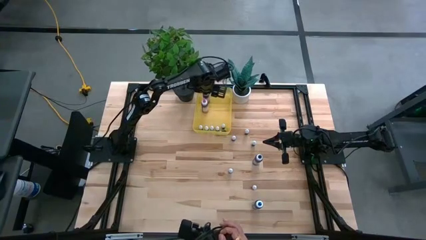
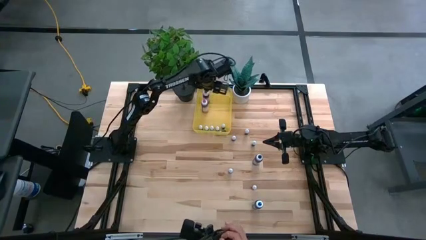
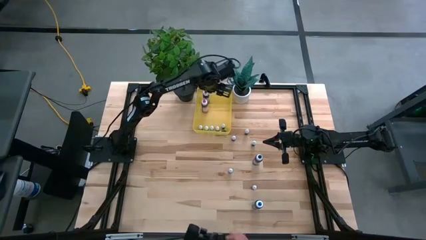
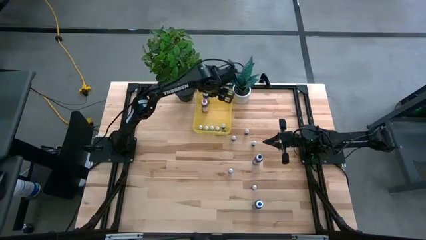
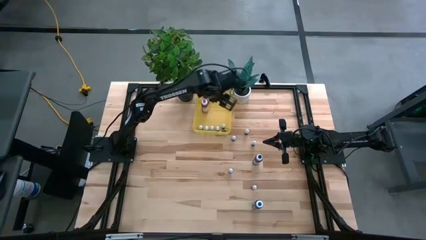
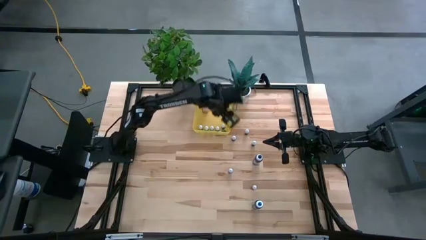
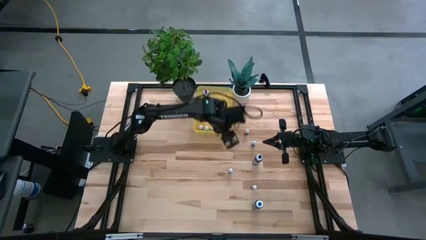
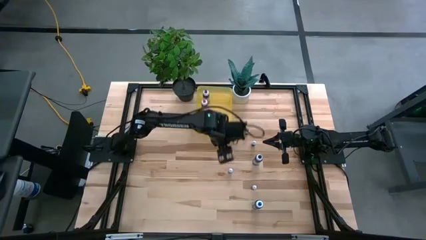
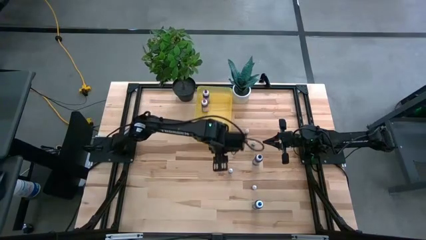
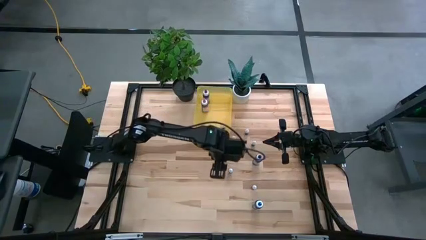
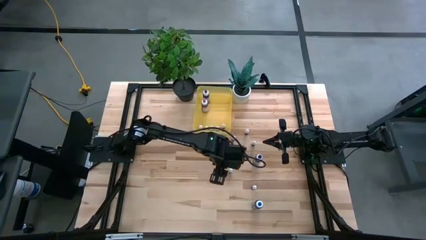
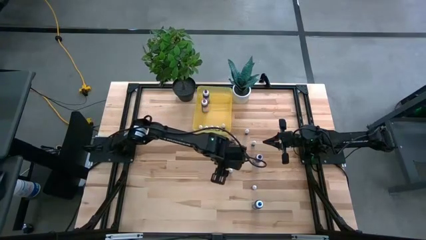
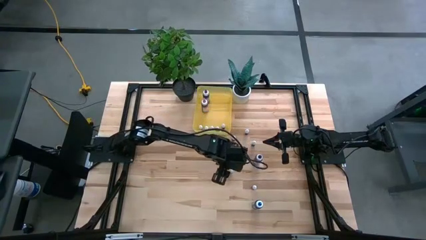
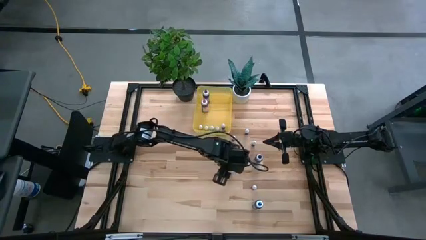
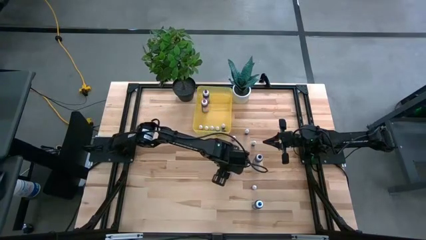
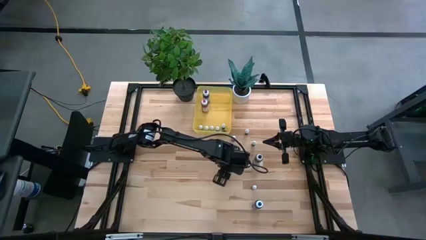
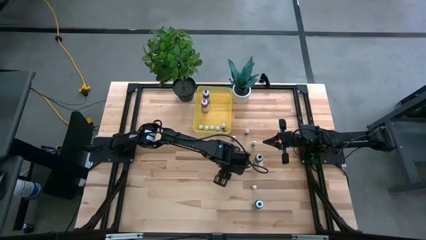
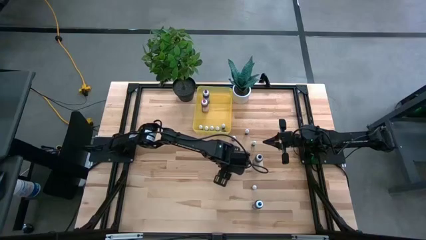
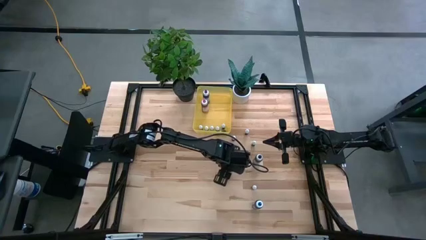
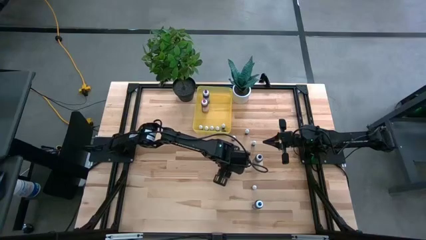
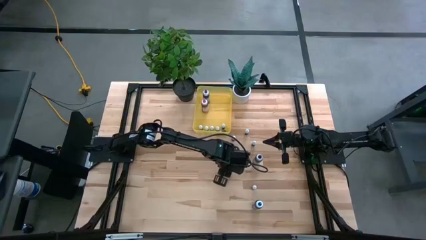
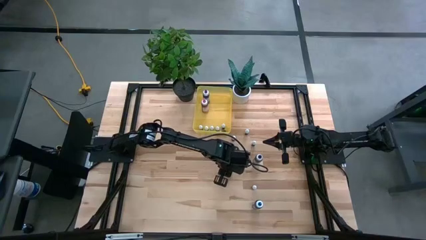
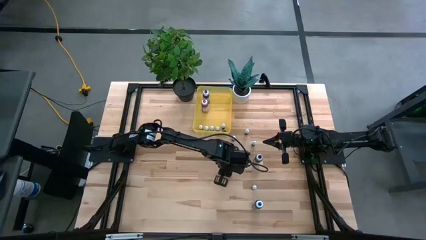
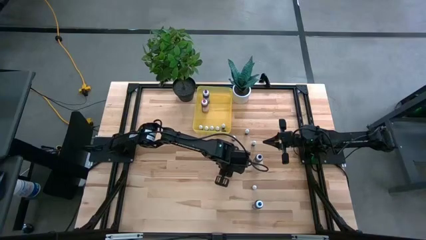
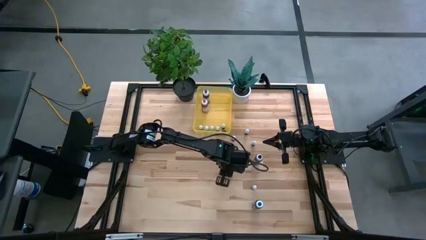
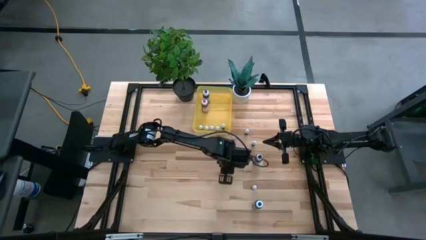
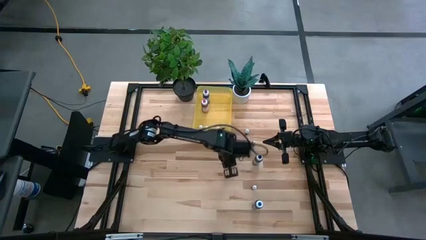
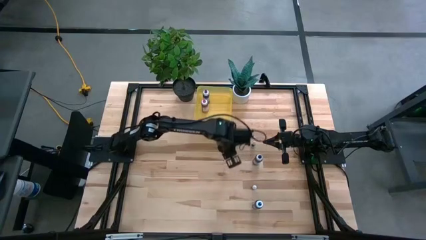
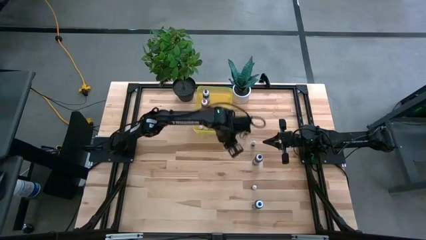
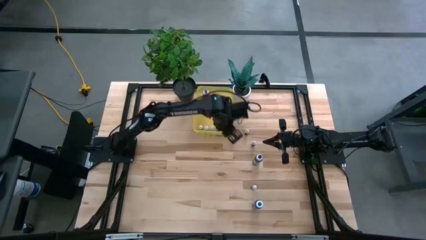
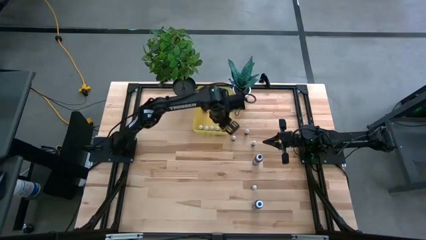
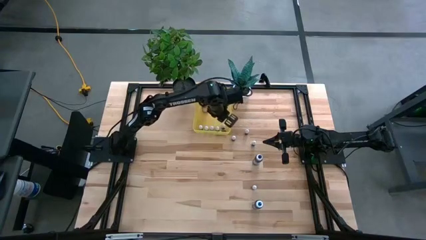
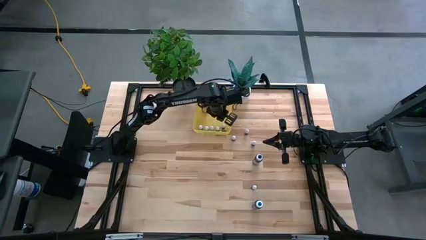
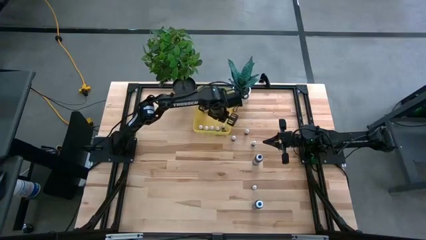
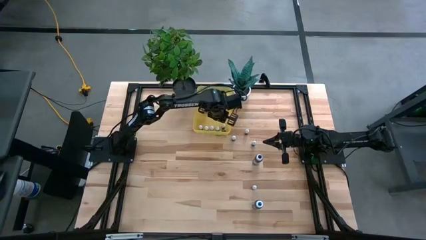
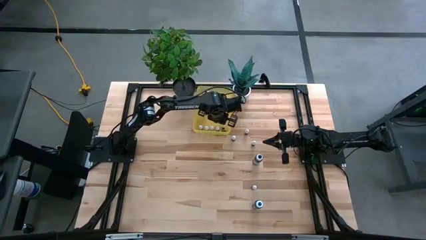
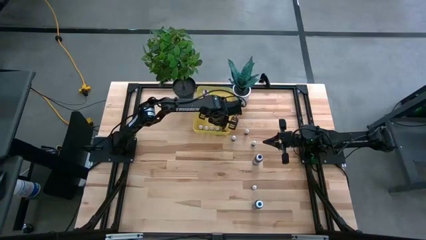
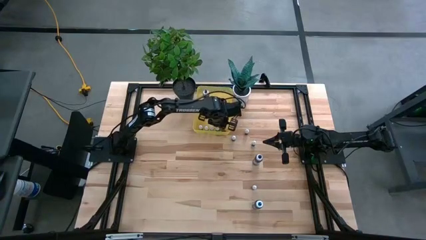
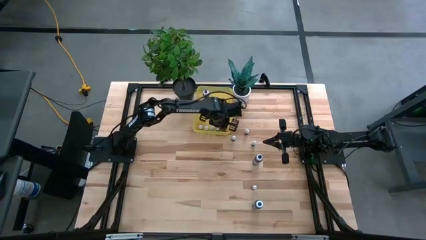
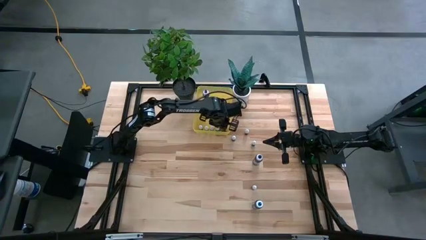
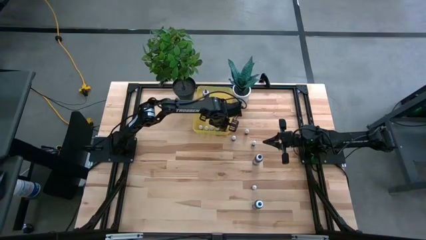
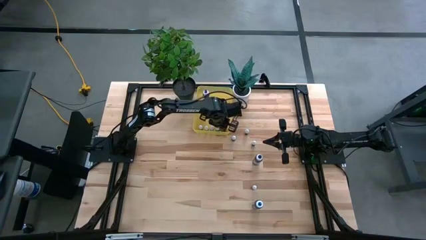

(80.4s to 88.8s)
Task: Pick & Place food coloring
Put the small light green food coloring bottle into the yellow bin

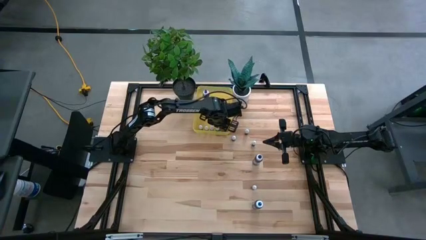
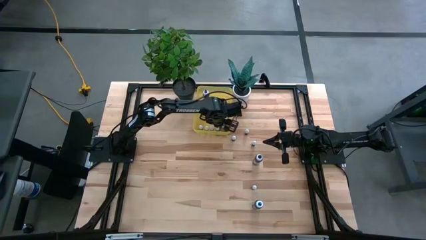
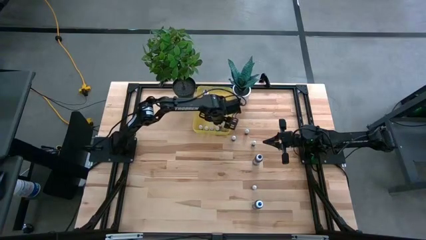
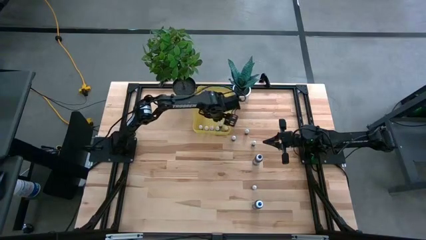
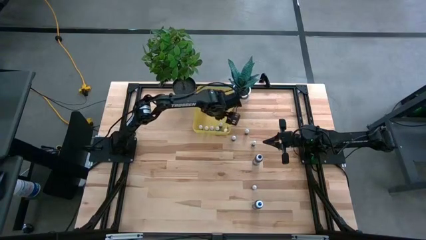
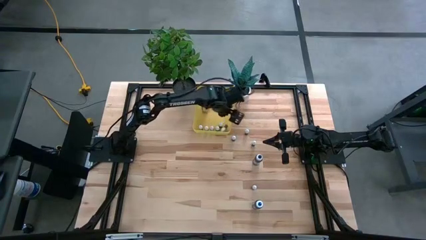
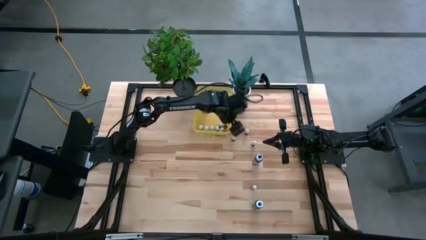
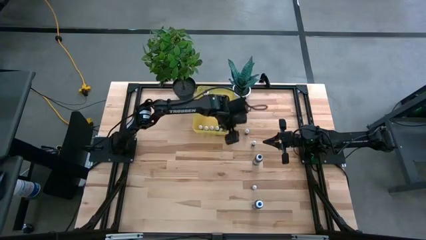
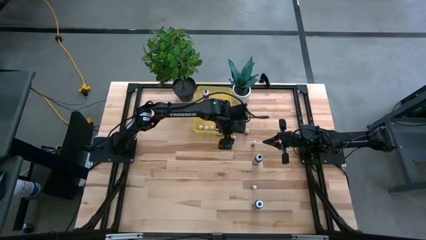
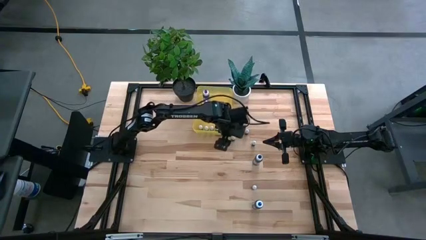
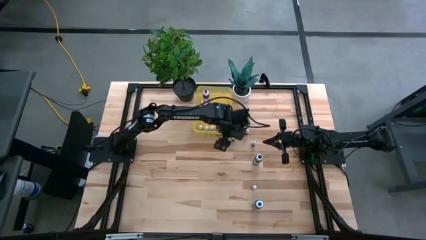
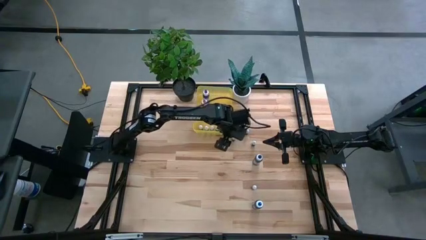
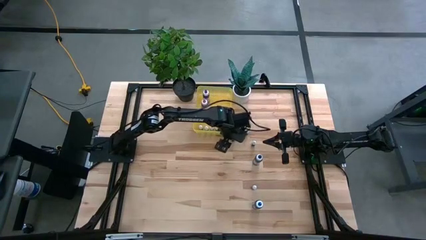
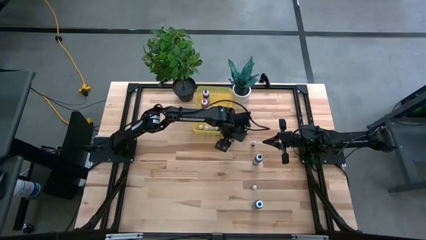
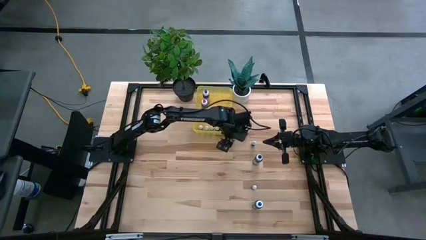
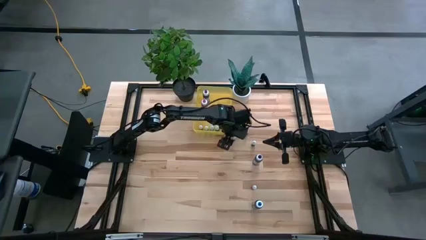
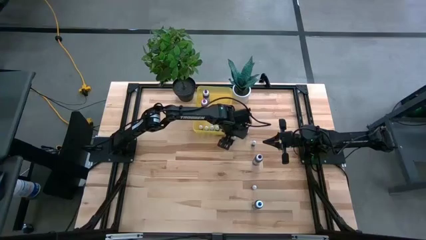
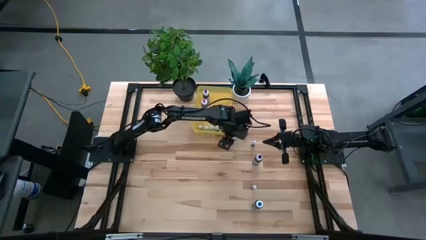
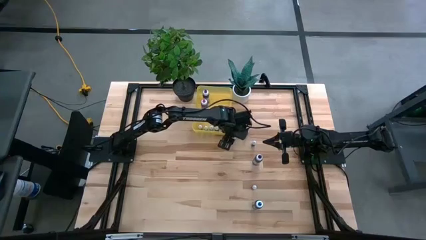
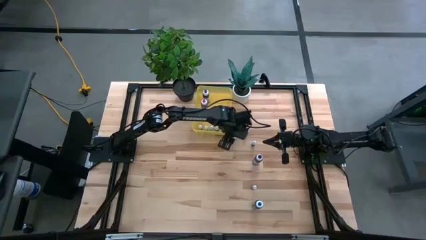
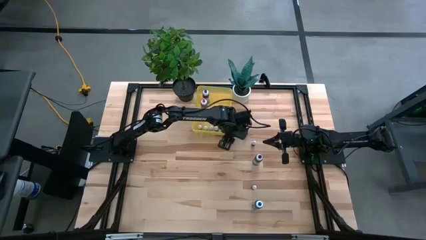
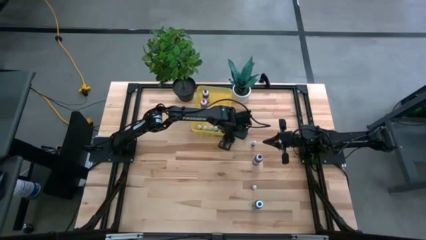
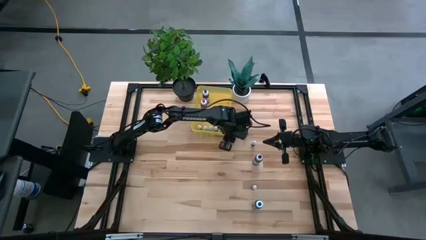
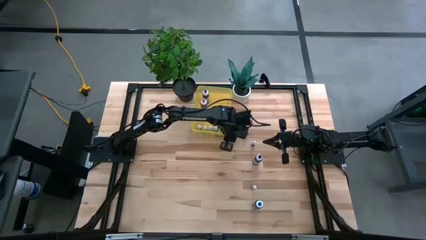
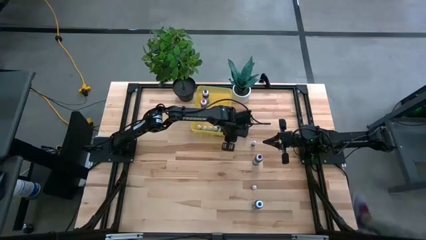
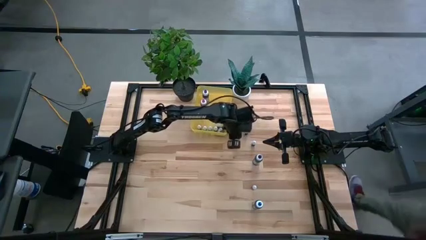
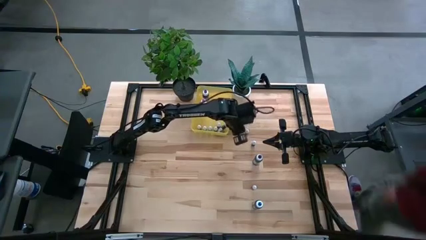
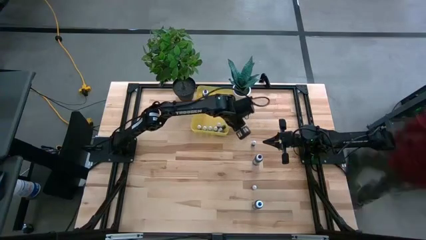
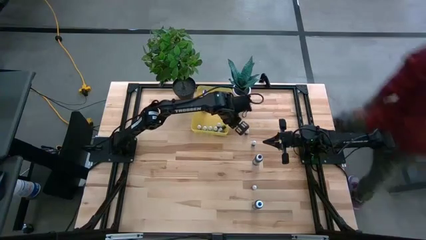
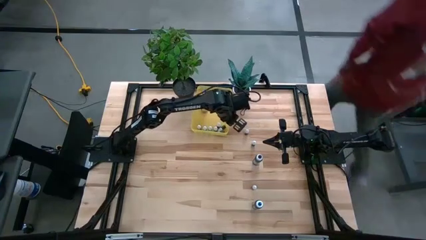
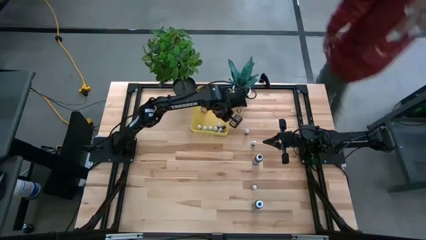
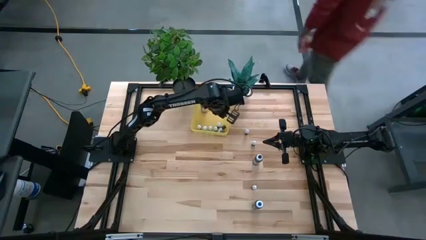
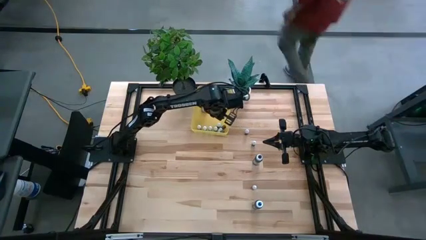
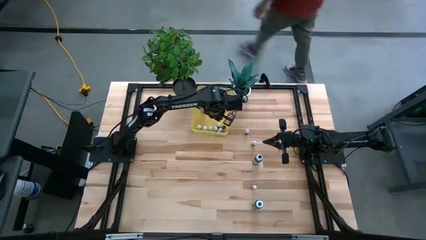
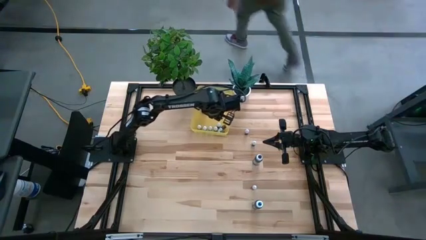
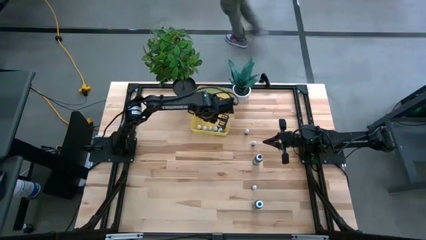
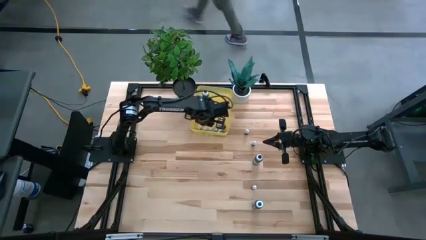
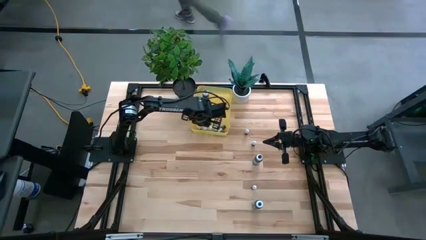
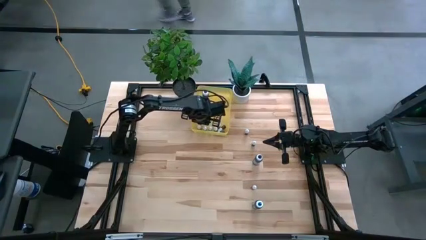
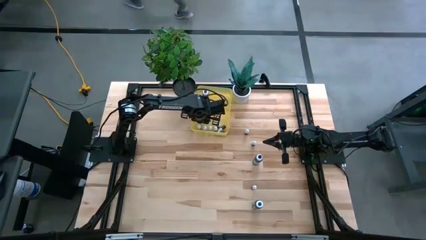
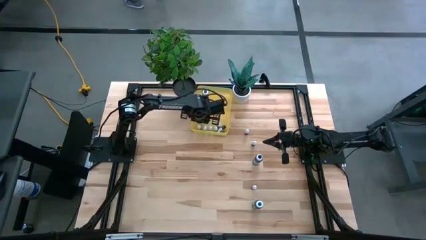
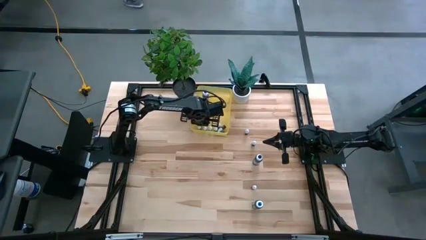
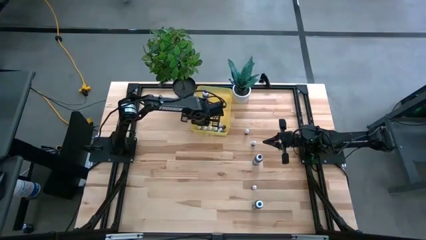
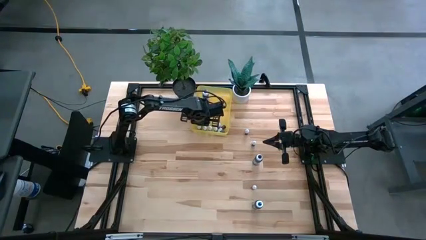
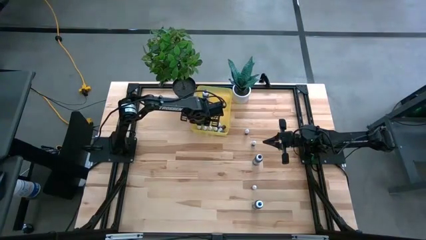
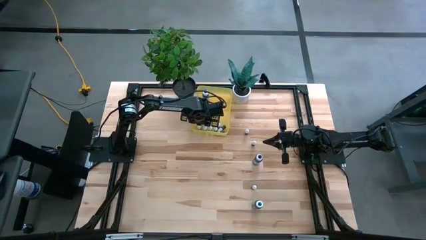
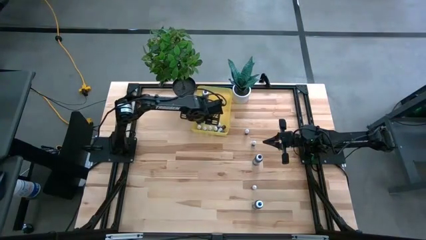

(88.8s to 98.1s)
Put the small purple food coloring bottle into the yellow bin
